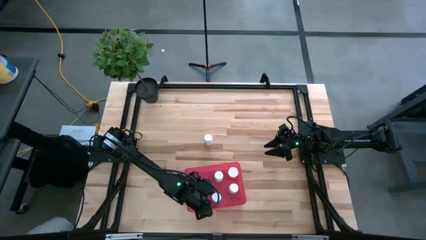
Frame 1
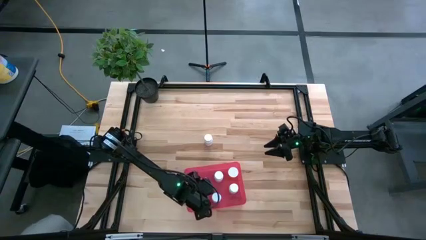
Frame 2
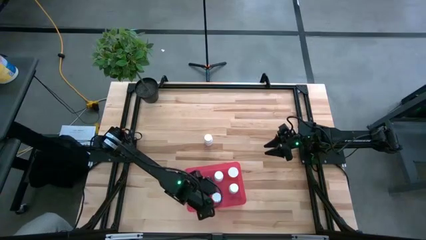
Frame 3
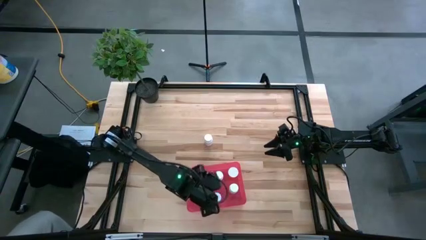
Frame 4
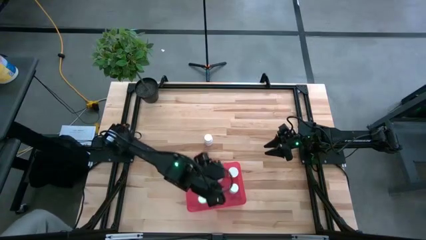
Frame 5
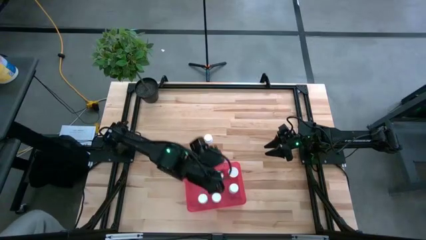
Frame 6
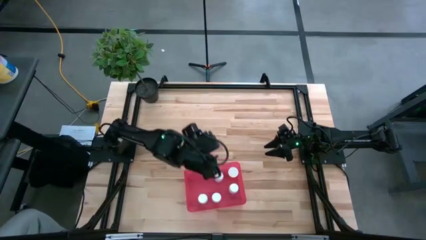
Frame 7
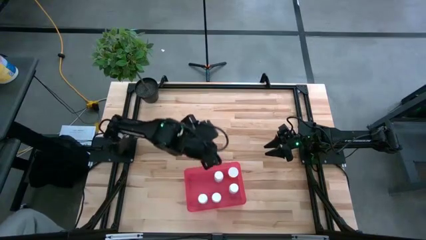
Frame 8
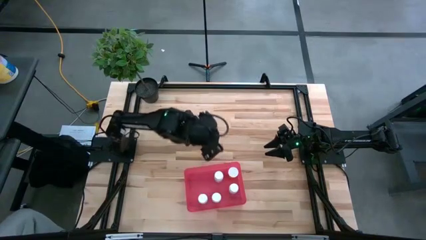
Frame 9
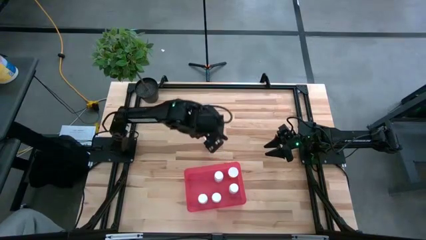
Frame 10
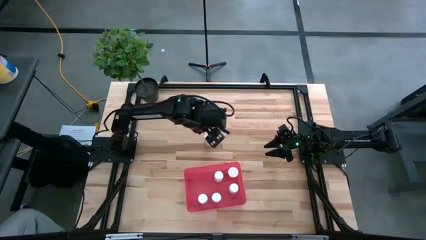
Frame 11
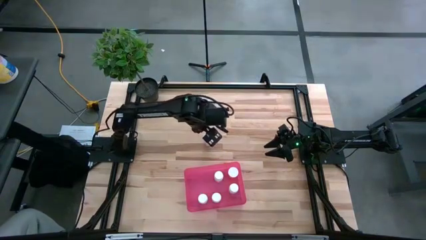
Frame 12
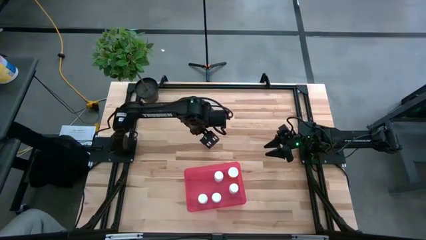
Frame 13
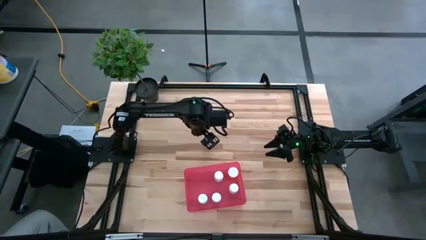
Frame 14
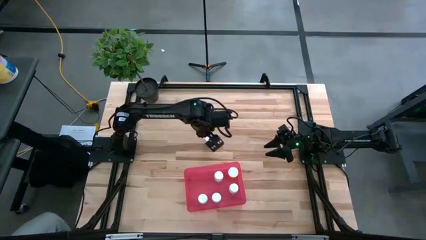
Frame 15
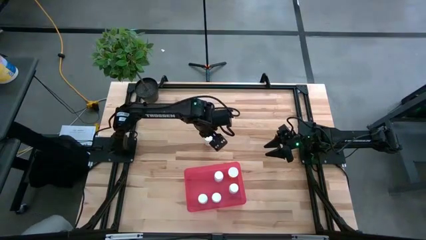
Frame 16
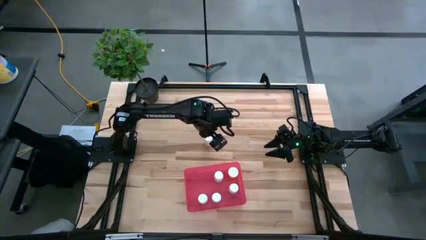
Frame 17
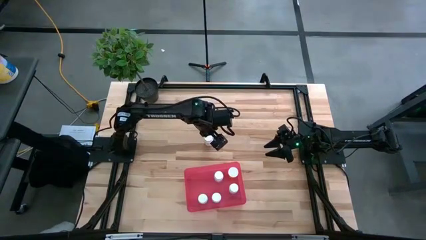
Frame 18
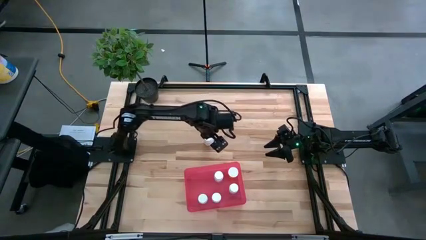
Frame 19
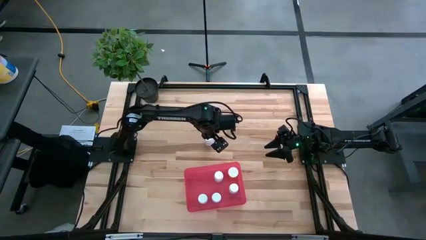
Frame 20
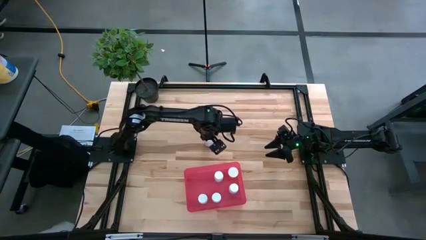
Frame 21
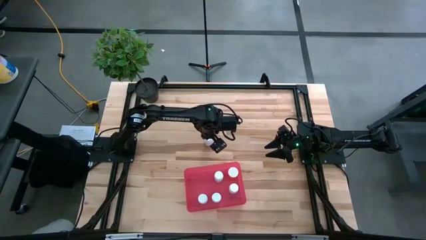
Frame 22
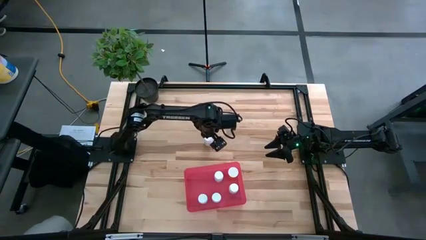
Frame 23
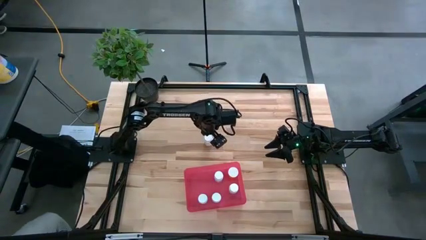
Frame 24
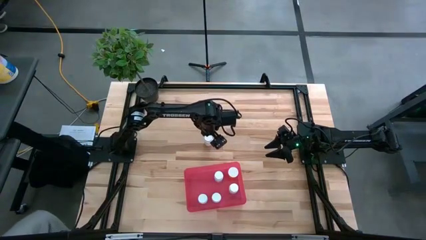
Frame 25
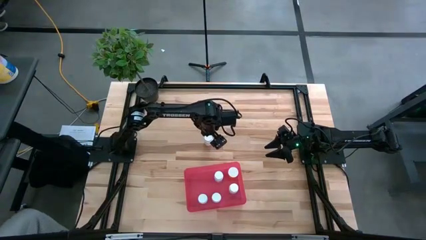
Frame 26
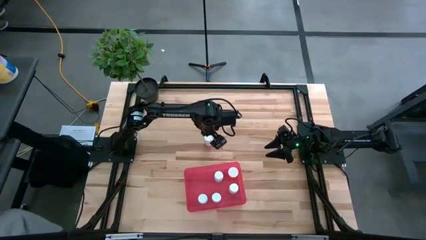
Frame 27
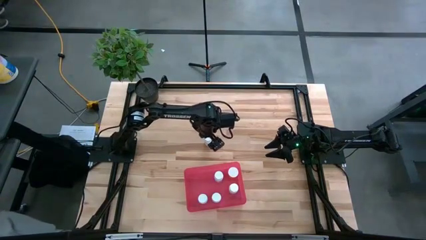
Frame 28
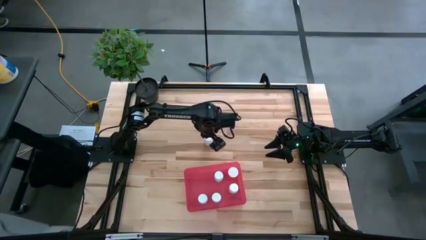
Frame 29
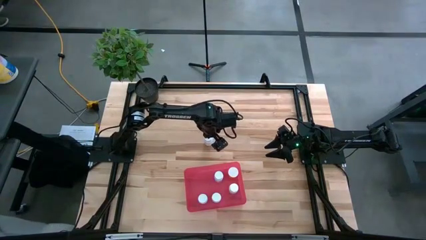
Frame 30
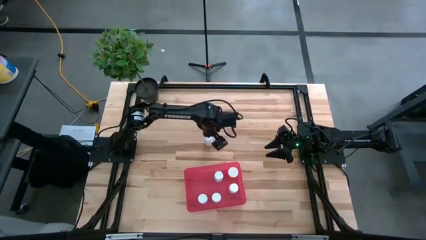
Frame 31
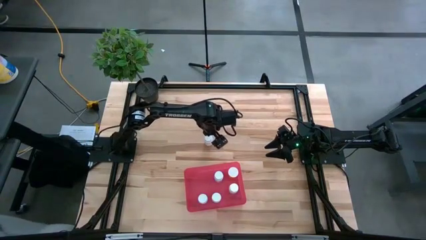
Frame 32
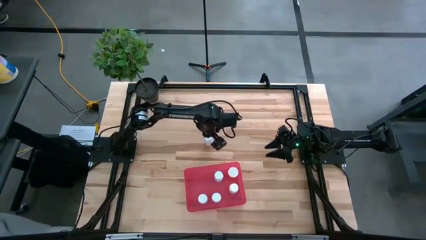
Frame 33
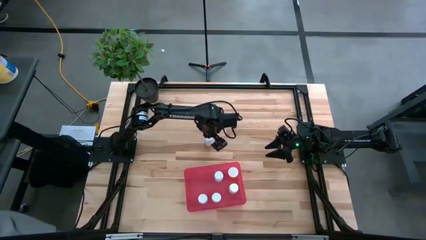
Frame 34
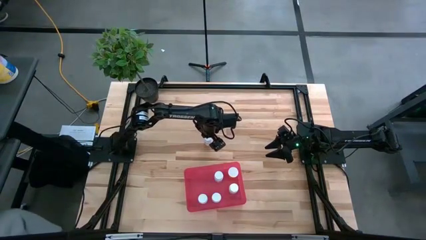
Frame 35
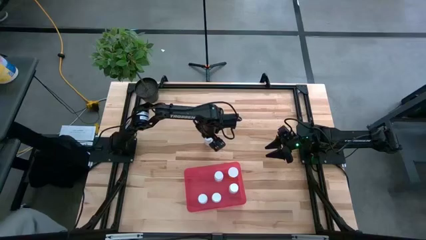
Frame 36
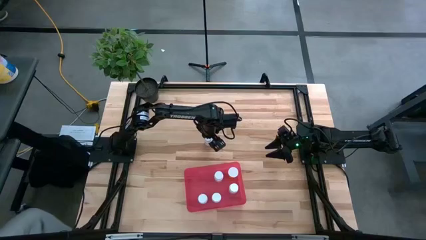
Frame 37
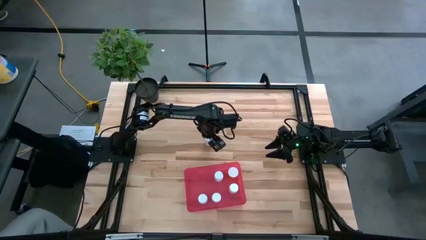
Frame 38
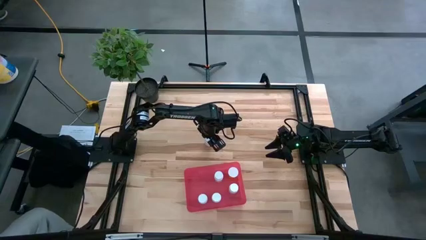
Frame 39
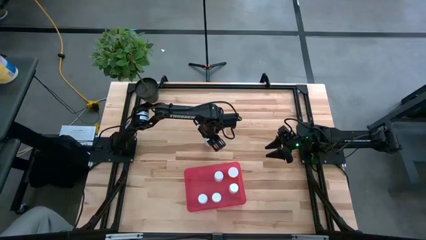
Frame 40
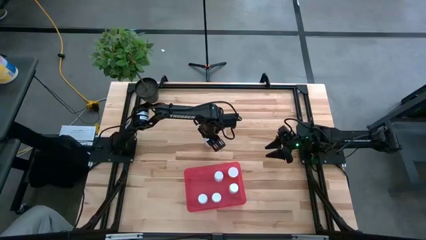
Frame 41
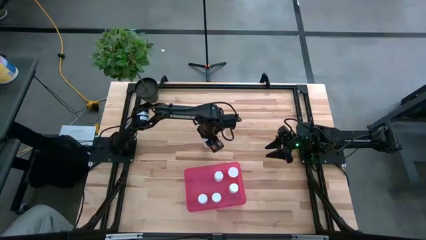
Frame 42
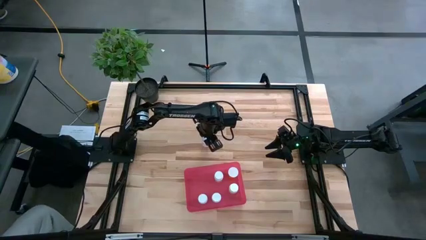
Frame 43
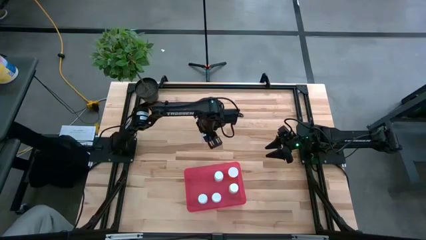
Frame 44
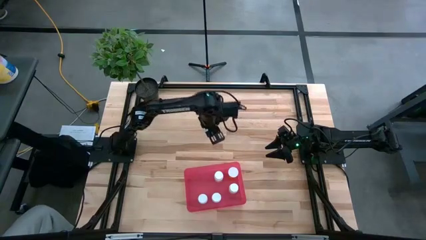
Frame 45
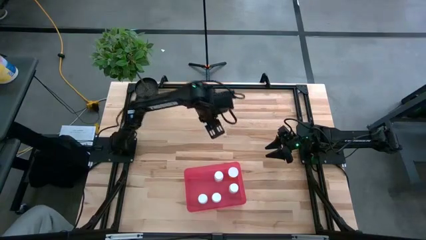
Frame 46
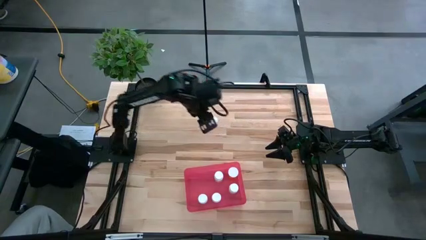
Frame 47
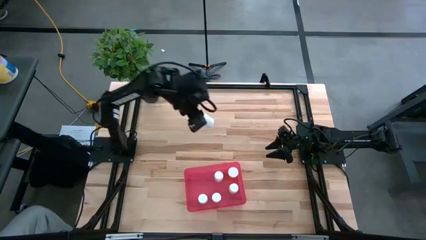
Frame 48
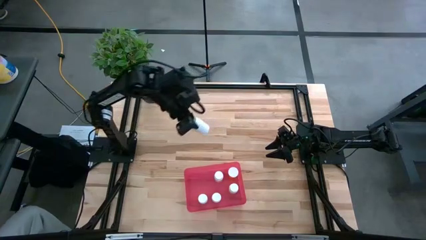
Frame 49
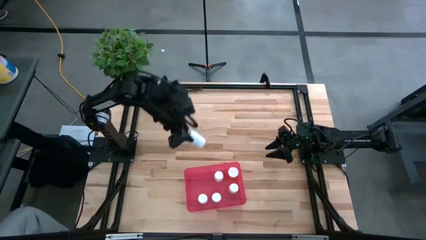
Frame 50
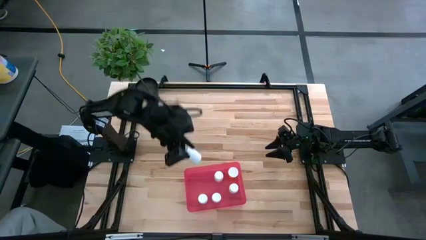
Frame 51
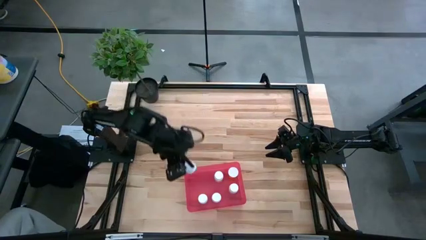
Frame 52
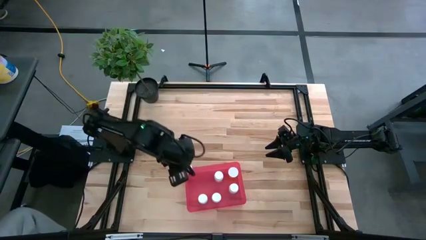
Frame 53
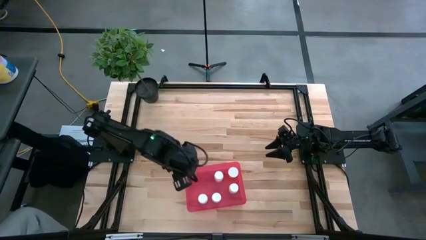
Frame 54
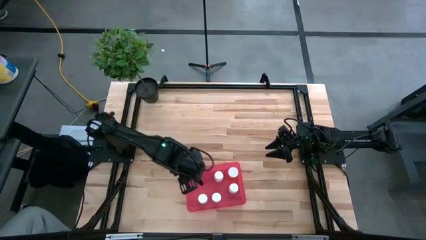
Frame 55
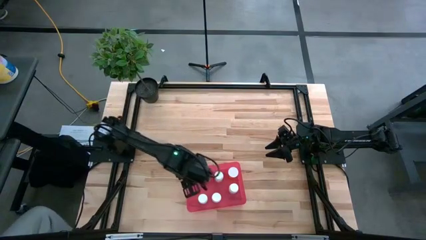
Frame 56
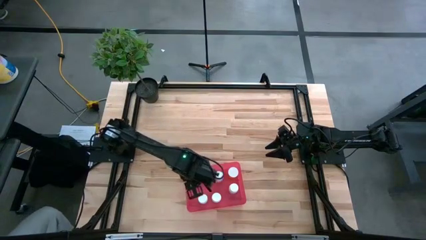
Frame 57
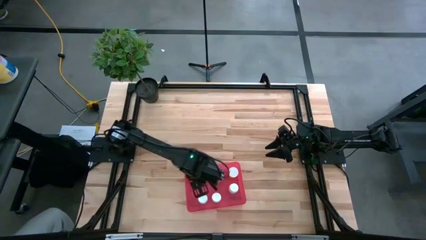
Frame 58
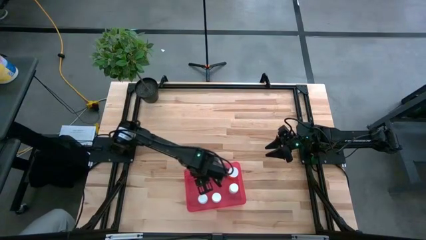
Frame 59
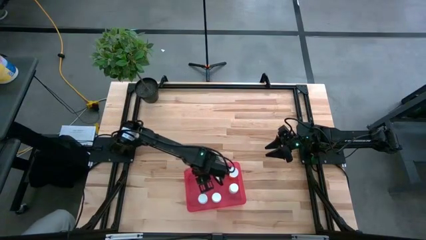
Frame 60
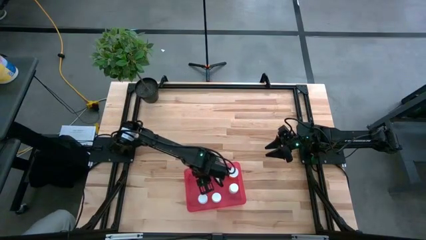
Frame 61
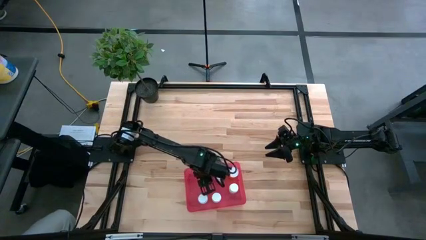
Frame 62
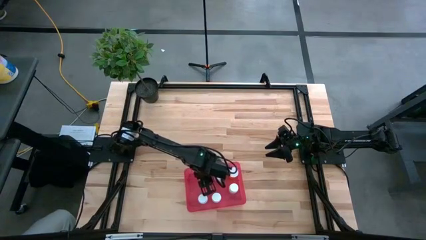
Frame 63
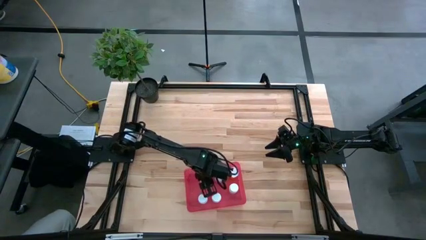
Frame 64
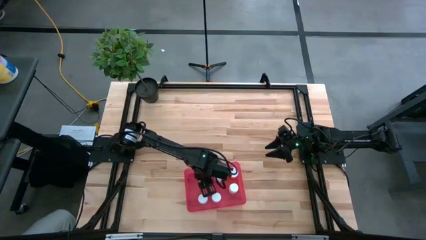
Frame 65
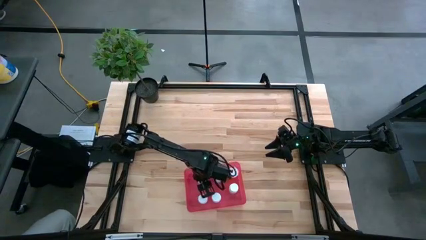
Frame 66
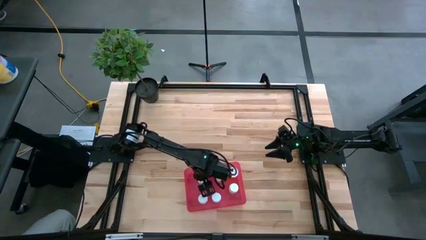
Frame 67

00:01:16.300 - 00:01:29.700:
Task: Pick and place pill bottles into a basket
Put the white pill bottle into the red bin

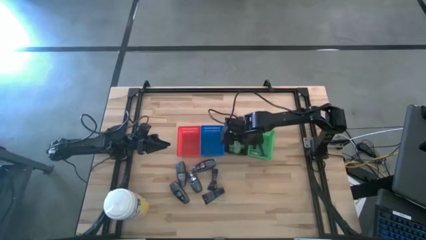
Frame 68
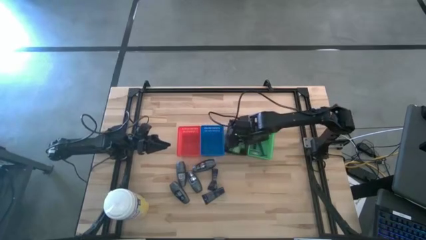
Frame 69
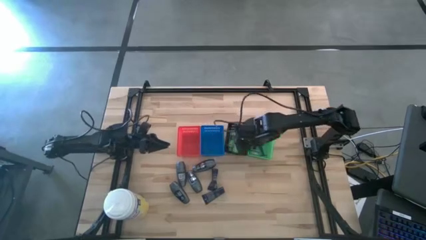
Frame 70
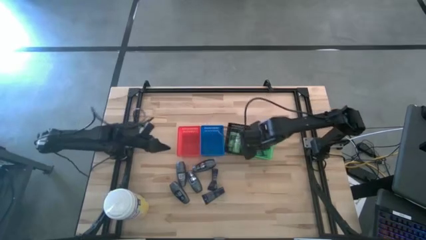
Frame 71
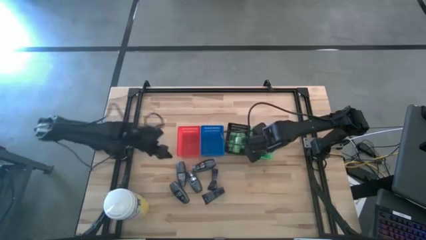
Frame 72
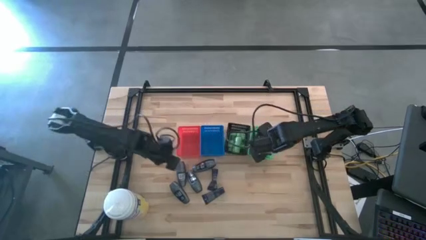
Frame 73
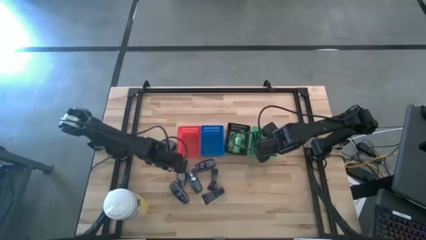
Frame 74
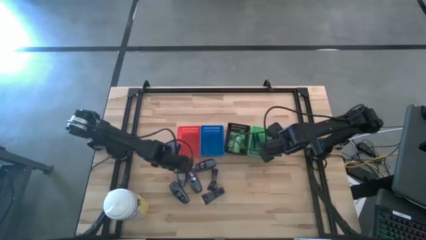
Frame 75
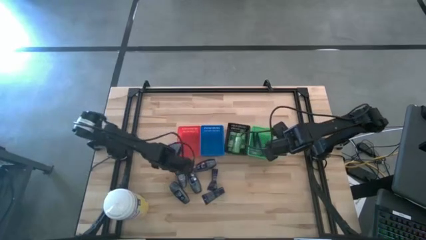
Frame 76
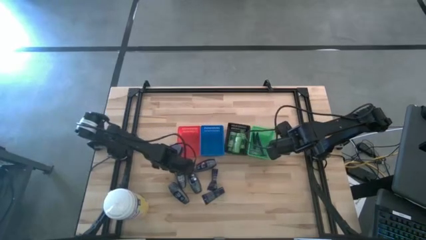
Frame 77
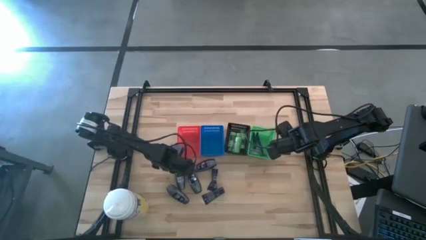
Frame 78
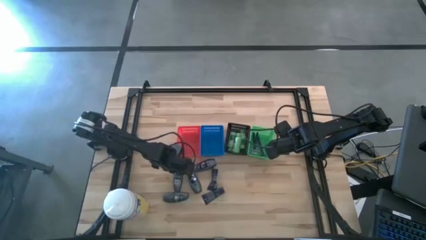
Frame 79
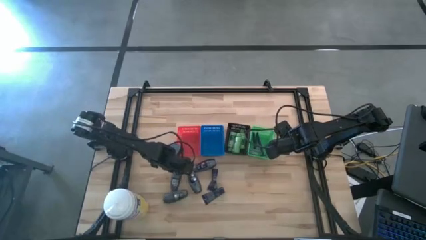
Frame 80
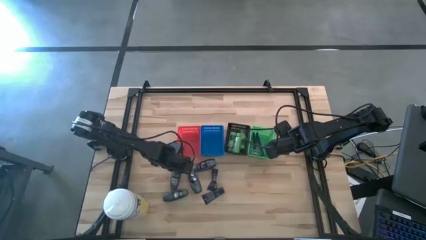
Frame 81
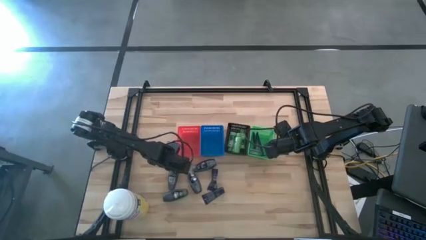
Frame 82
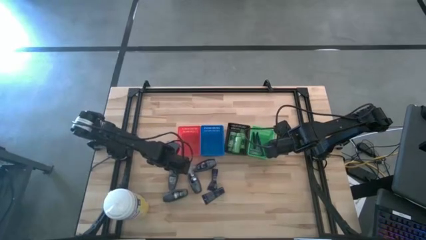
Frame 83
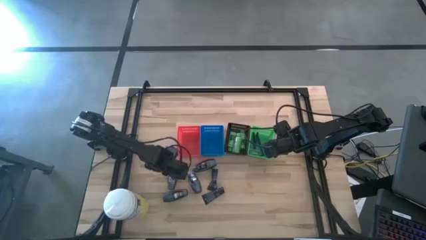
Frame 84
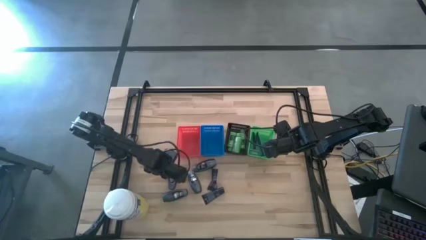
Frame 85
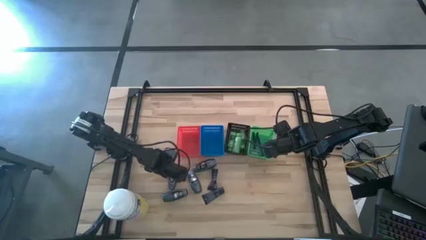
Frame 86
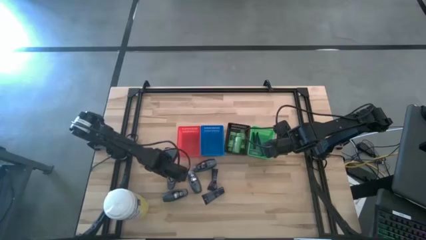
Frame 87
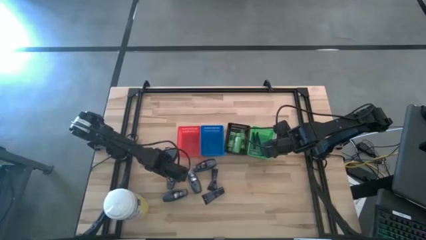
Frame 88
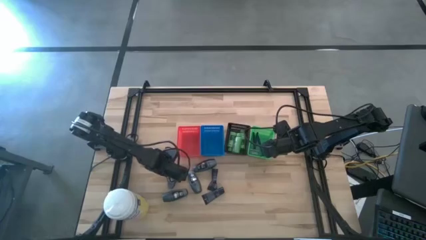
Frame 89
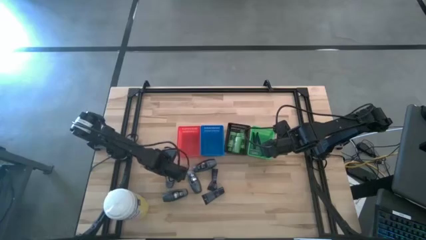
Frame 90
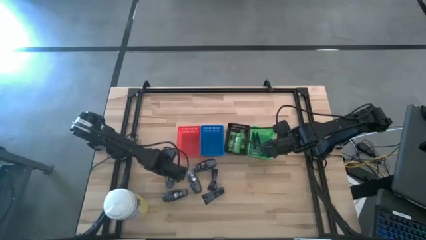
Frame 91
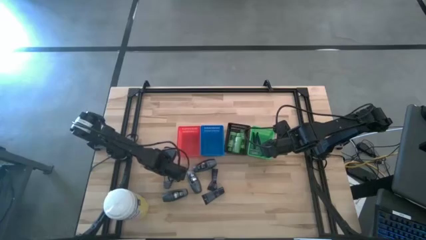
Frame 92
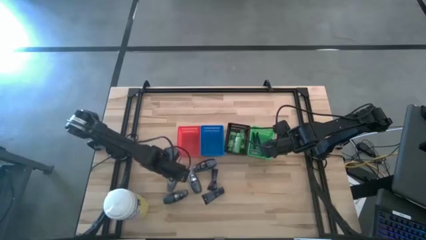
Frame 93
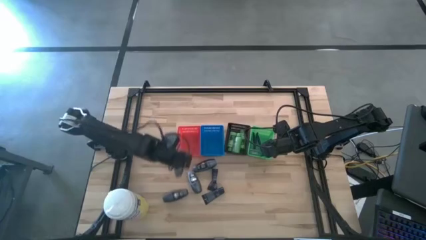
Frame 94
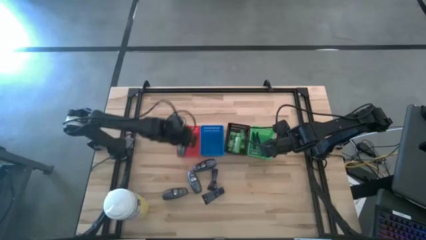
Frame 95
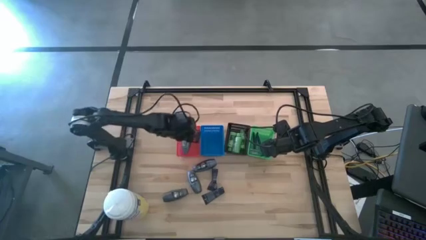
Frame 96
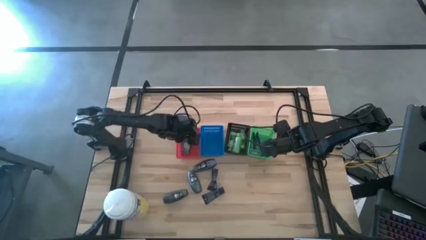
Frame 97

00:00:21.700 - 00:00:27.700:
Task: Pick & Place Travel size toiletries
Put the deodorant into the red bin
